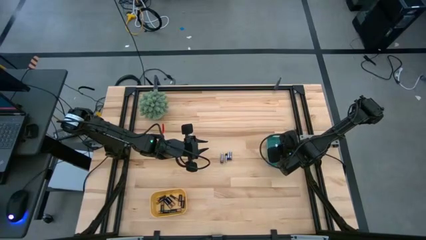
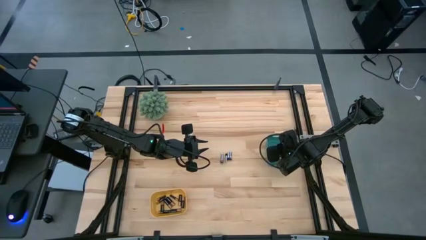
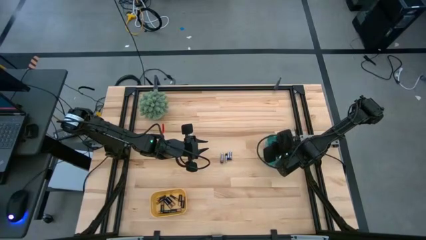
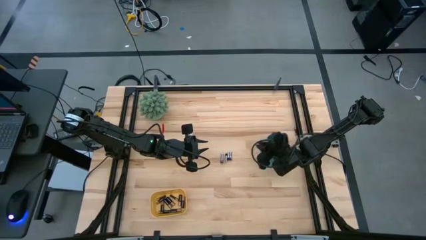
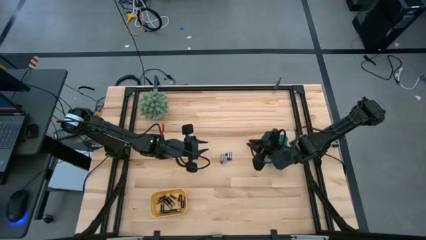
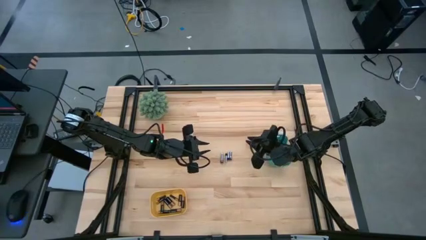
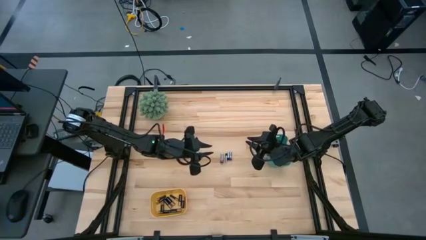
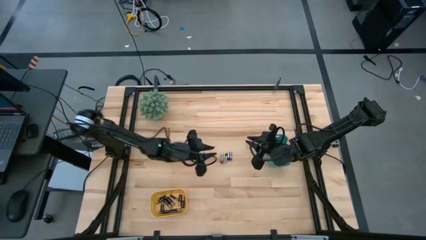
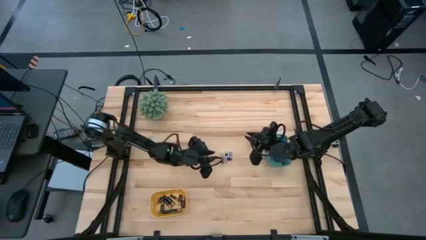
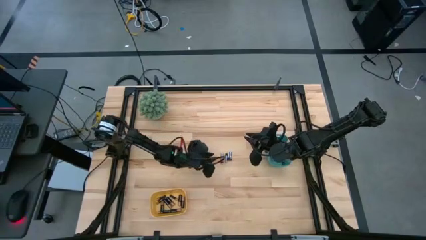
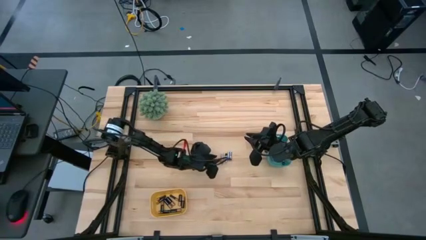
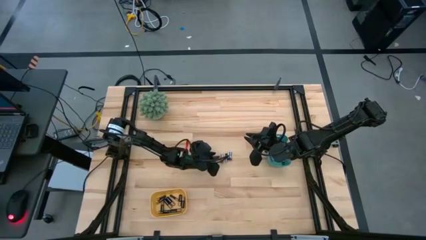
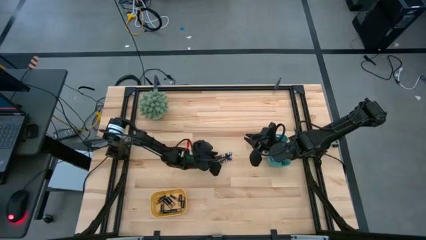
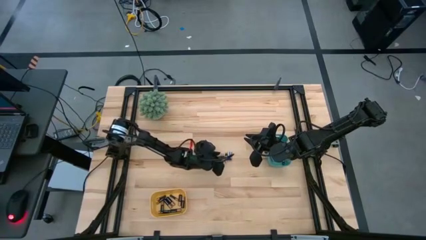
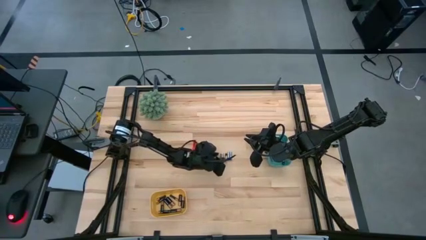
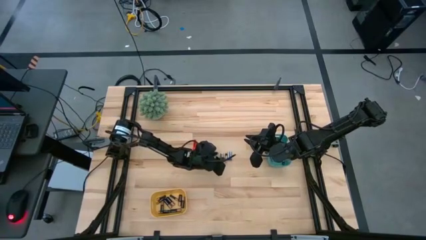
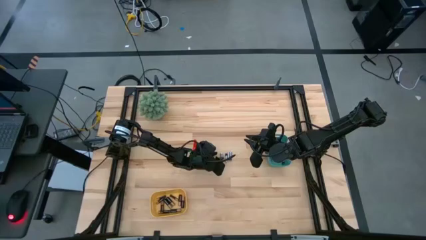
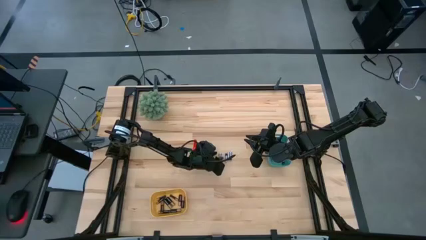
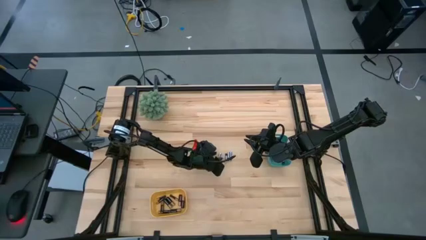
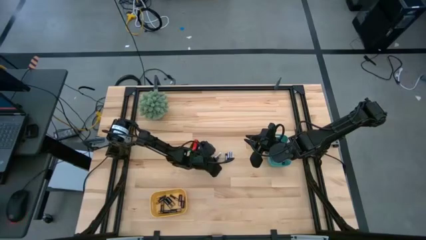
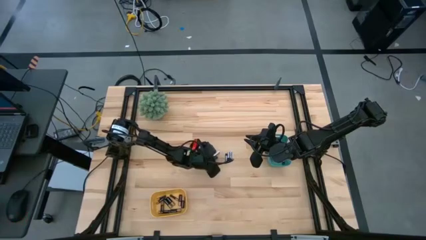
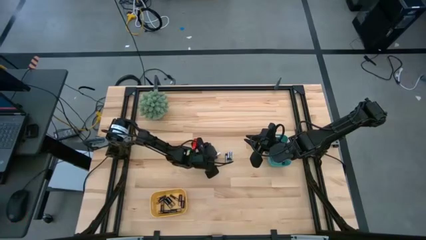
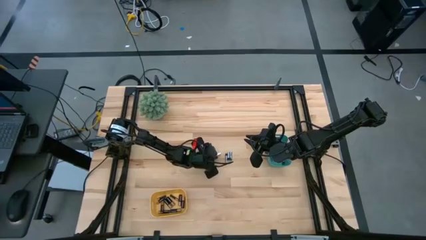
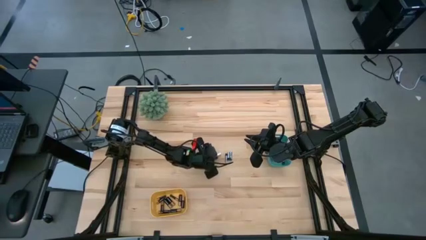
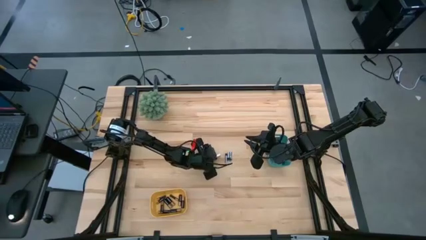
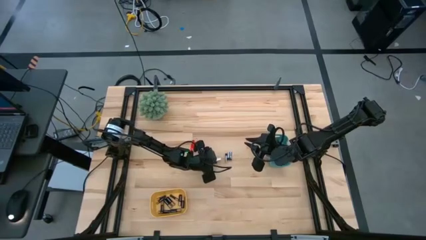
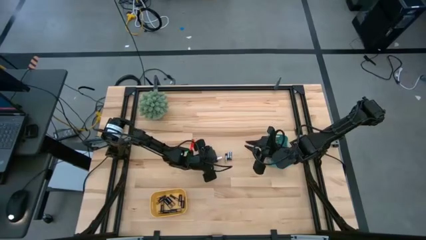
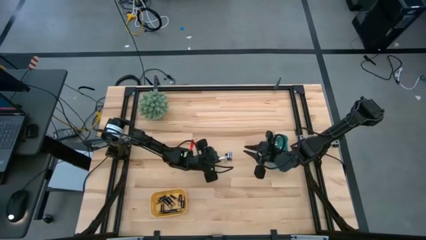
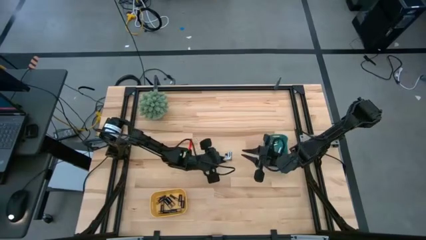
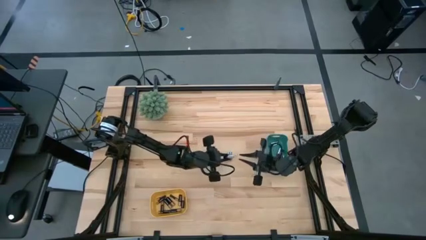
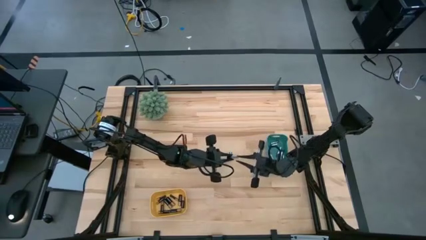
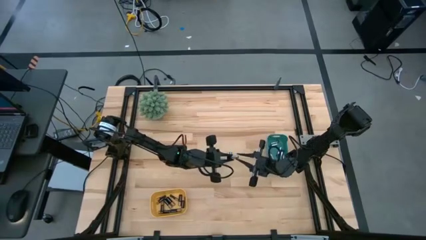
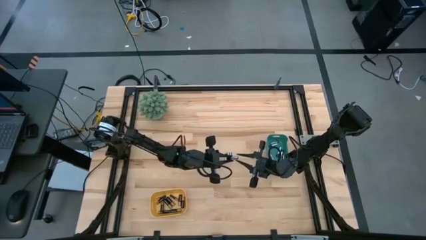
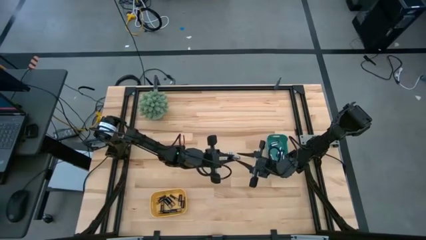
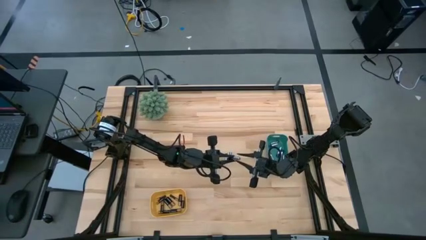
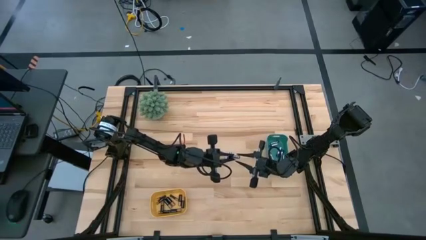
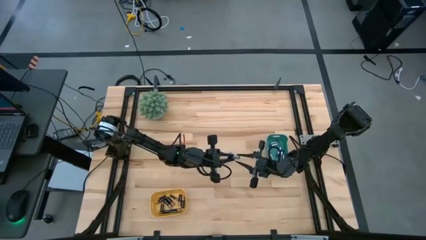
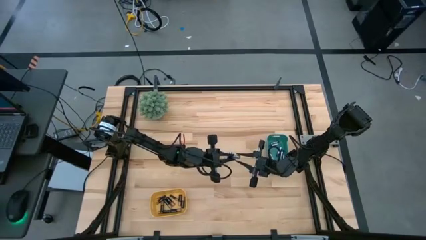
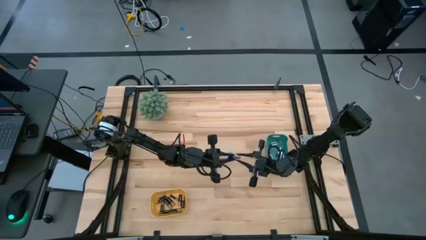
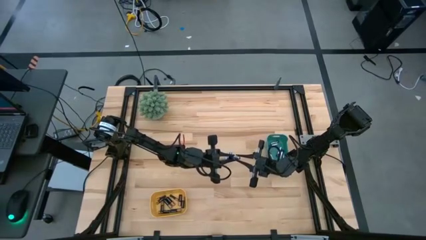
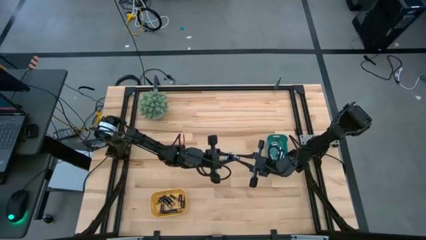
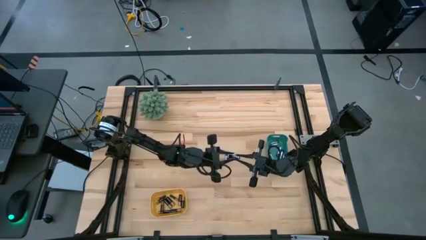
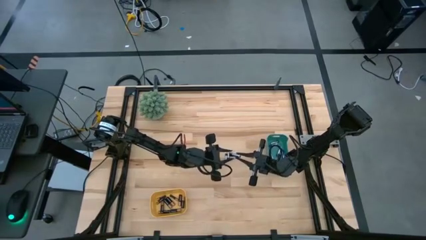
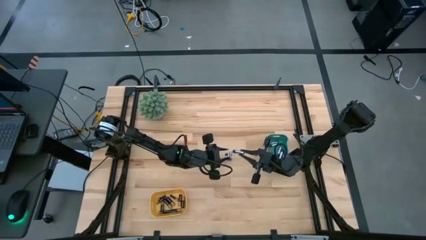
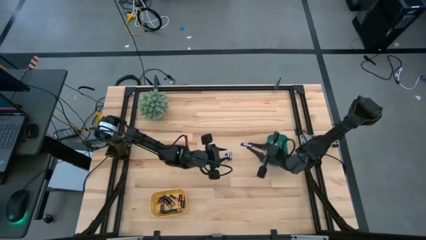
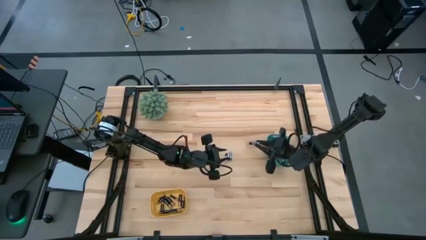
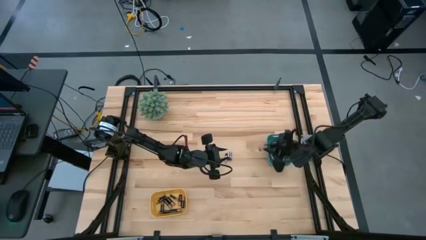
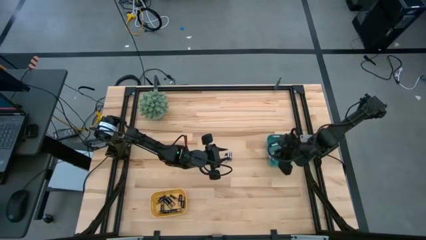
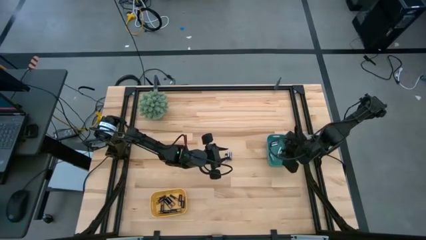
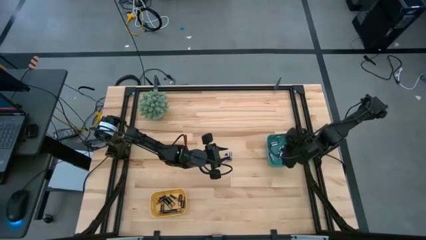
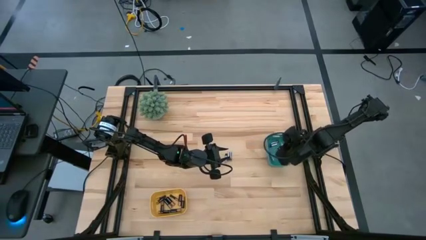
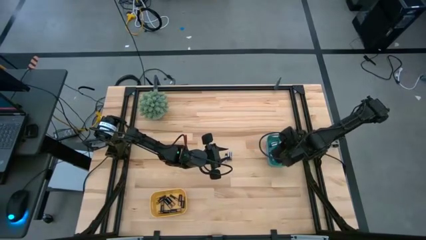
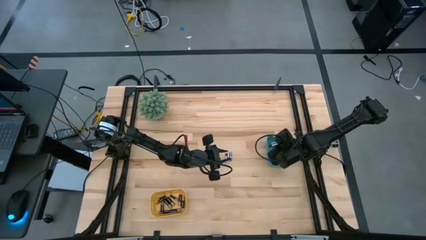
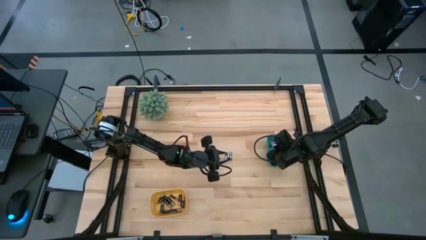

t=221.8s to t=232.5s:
Task: Sort batteries
Put the silver battery into the green bin
